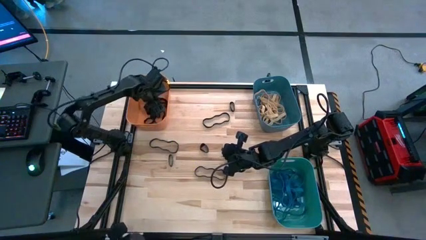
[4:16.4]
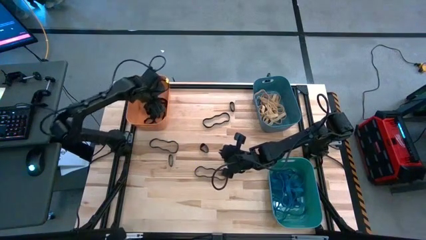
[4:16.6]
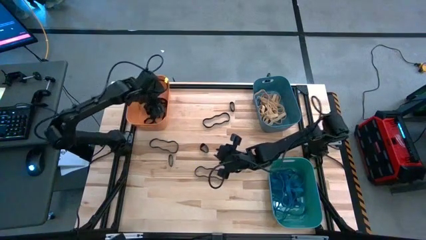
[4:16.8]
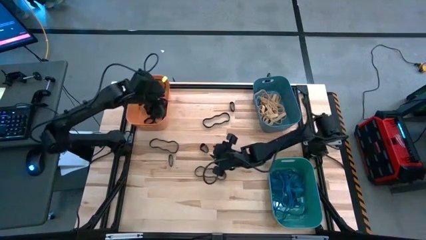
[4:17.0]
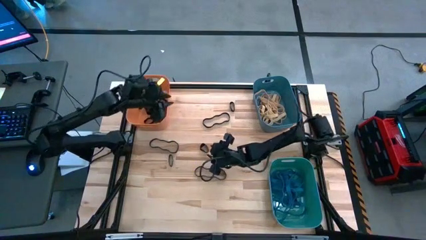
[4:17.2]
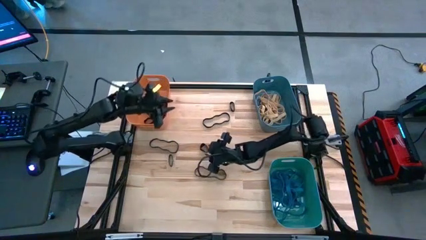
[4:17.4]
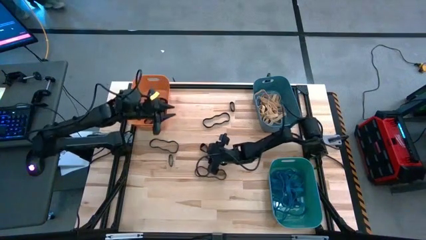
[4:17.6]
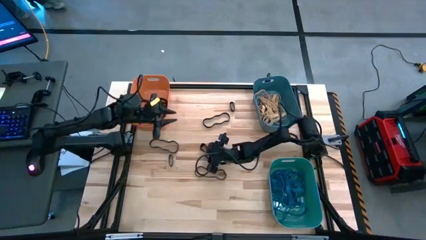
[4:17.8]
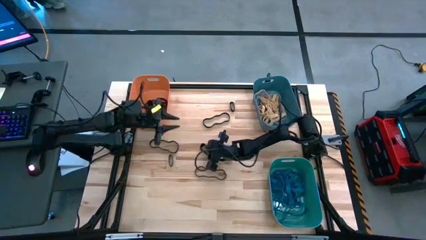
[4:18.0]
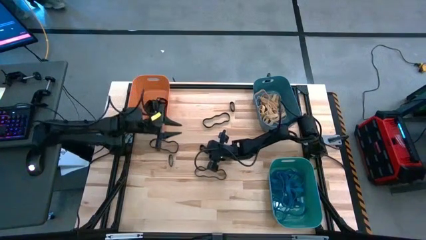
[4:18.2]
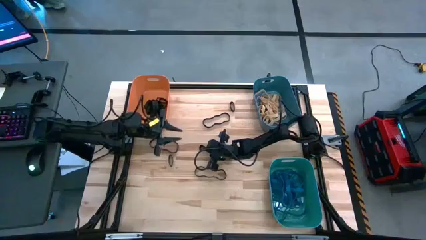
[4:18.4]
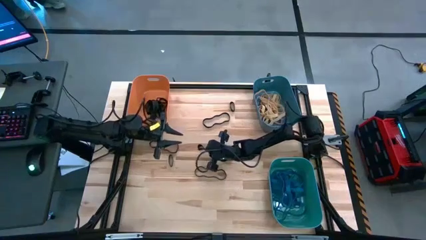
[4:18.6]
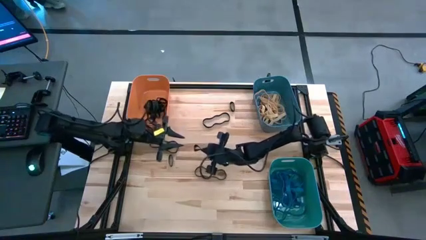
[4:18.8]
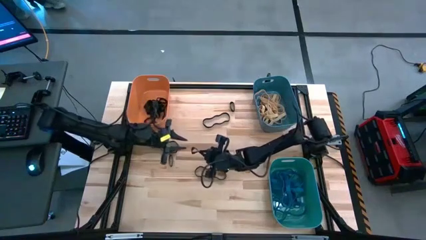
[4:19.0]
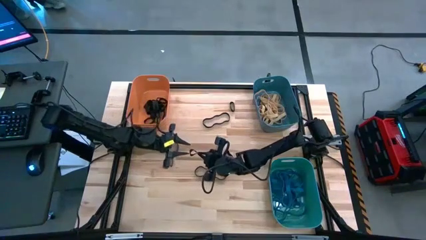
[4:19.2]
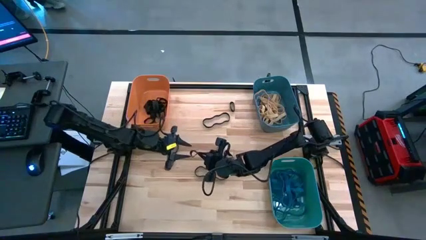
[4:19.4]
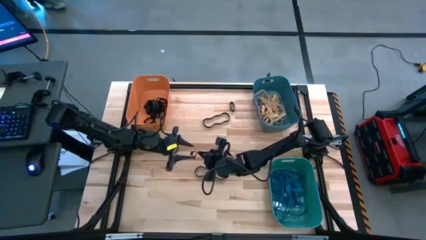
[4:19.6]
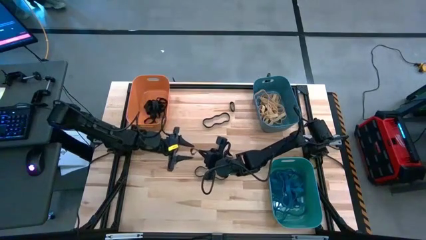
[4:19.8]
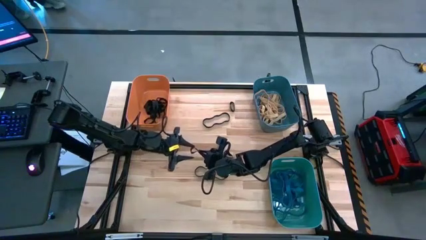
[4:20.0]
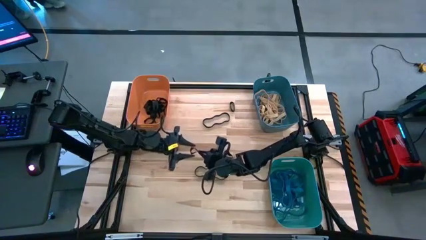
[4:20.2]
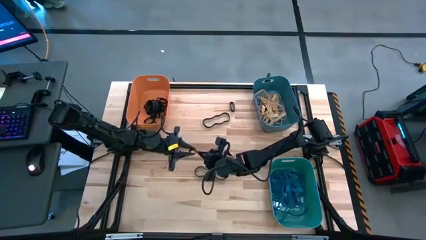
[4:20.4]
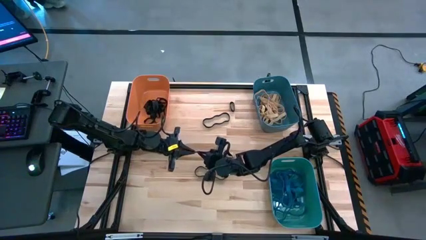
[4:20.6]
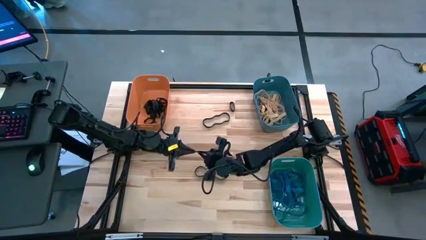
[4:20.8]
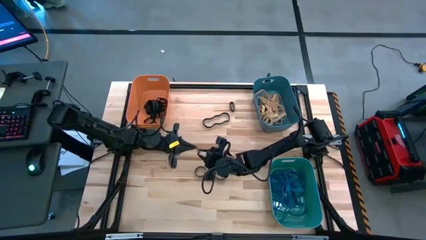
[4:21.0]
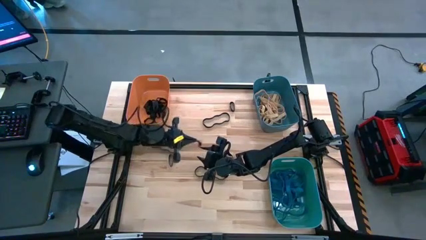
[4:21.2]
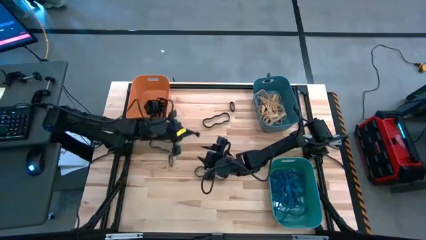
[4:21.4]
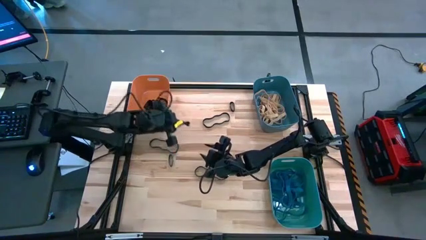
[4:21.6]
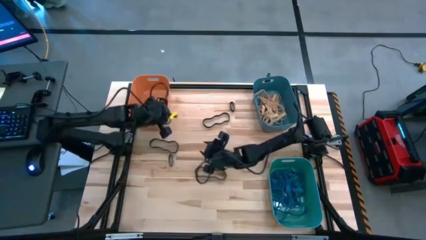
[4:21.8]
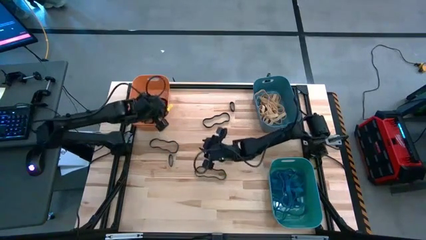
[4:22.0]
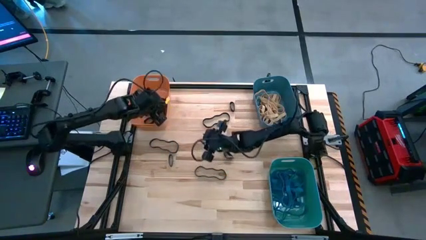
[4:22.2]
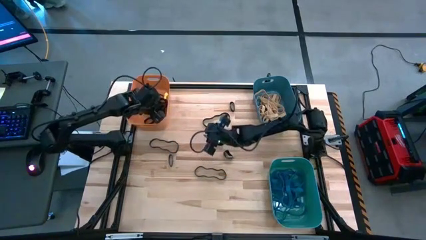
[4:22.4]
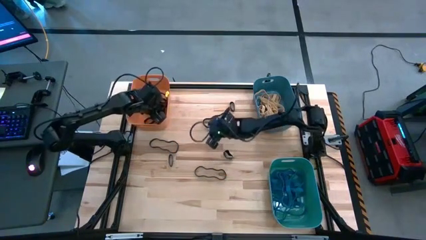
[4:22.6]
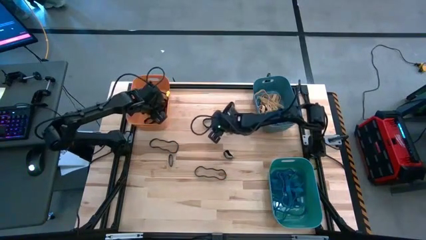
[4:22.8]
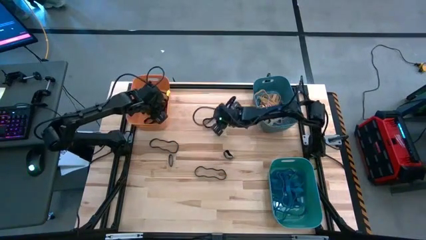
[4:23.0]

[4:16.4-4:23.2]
Task: Sort rubber bands into baskets
Put the black rubber band into the orange bin

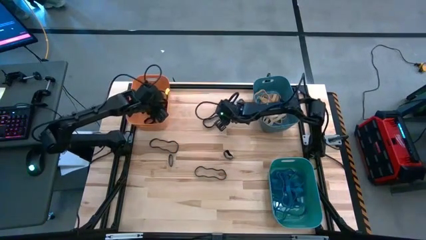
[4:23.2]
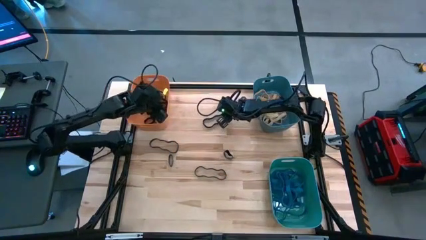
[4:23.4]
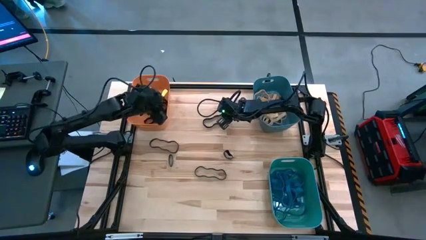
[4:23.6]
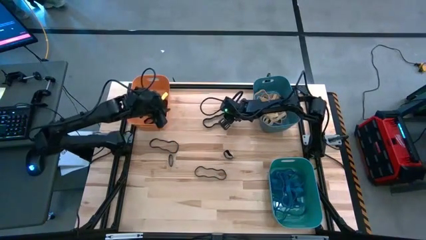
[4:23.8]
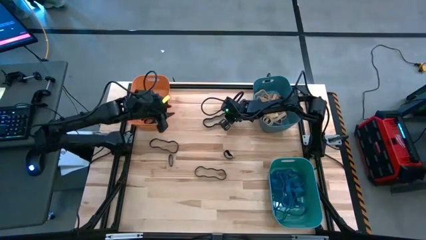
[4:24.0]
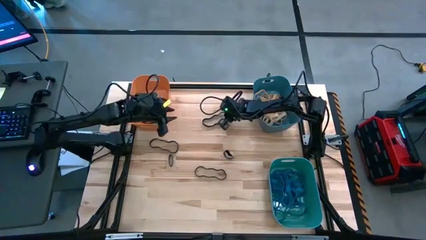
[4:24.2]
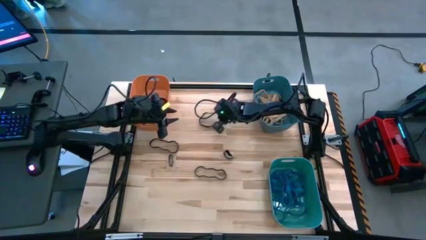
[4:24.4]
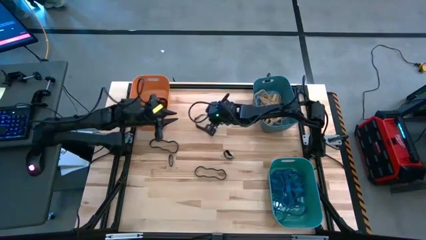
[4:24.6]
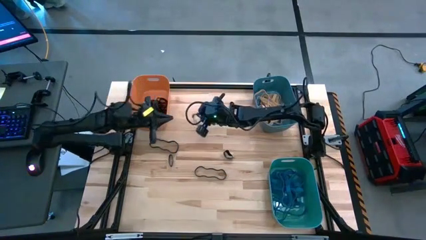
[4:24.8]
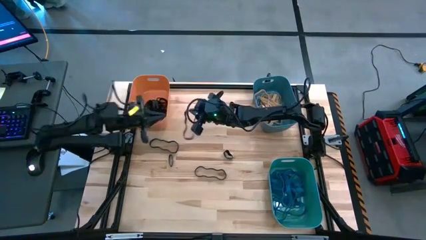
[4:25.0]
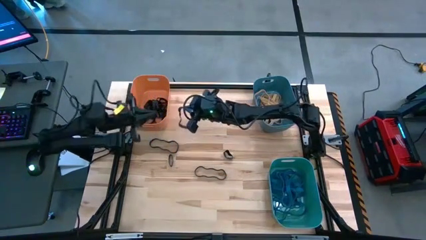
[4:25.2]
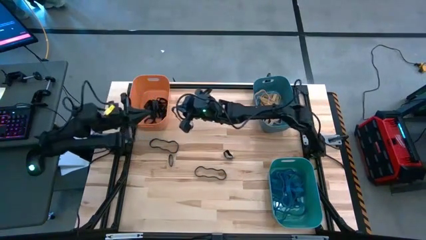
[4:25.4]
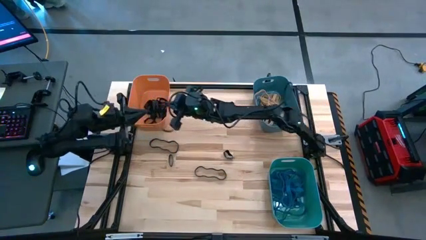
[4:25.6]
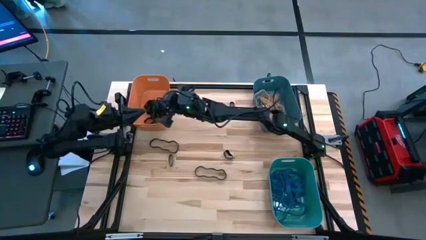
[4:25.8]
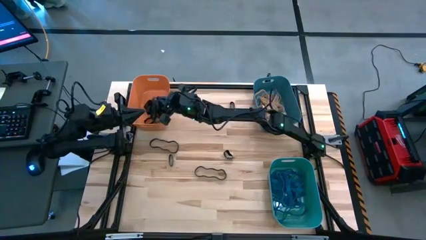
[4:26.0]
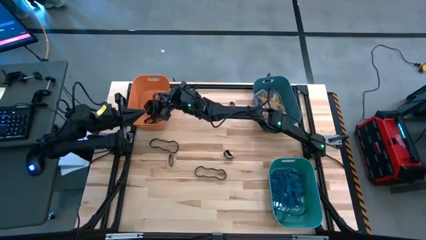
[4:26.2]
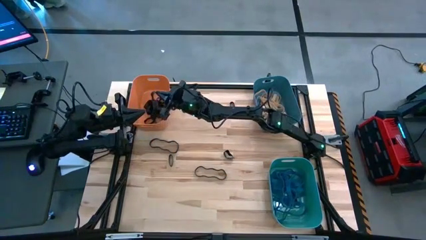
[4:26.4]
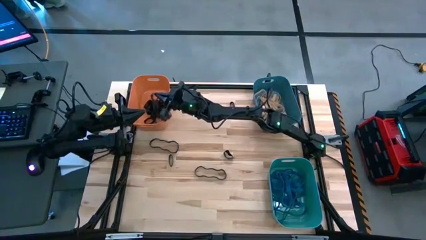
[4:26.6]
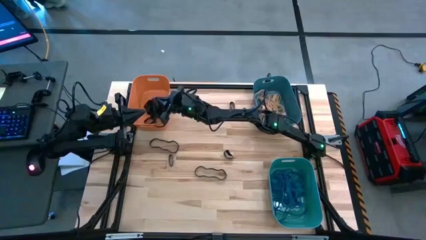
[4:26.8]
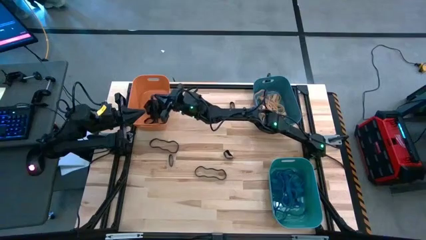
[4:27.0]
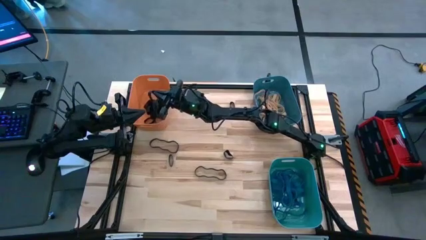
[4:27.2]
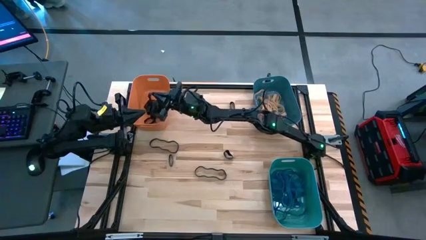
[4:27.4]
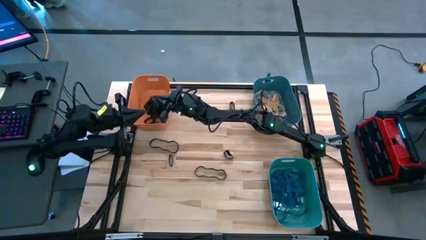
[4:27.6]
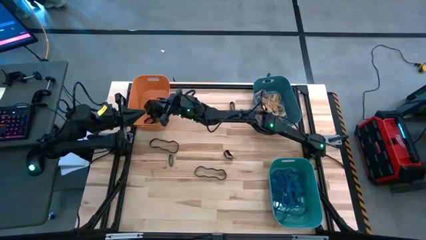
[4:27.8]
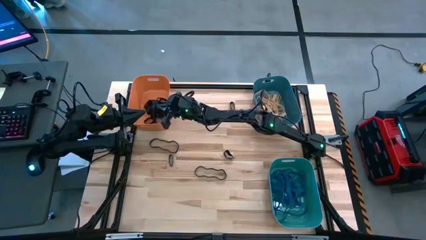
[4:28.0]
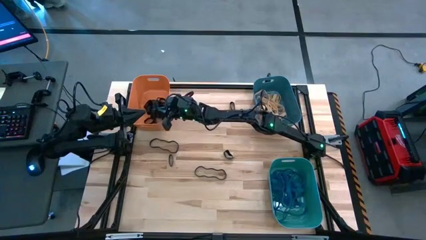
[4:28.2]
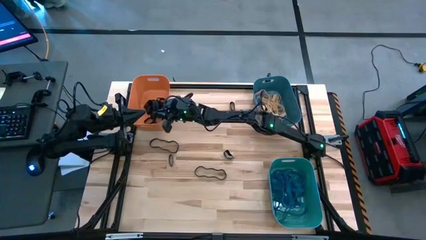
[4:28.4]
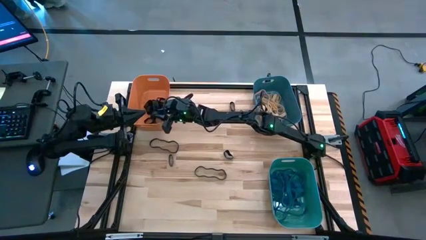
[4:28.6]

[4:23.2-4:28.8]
Put the black rubber band into the orange bin

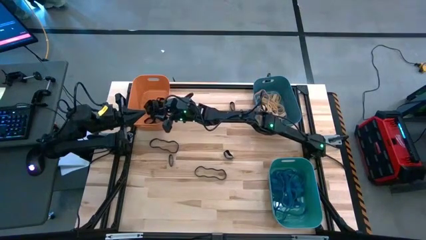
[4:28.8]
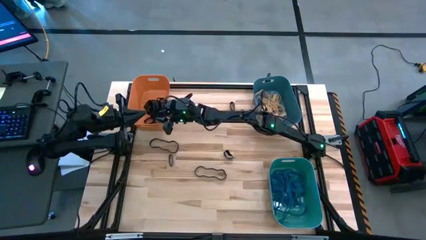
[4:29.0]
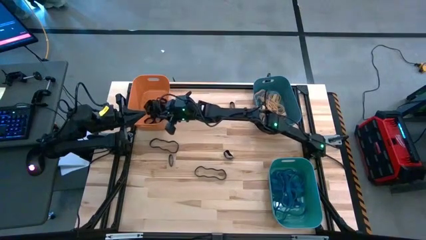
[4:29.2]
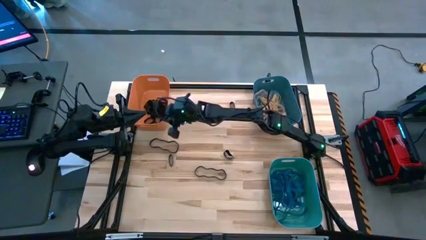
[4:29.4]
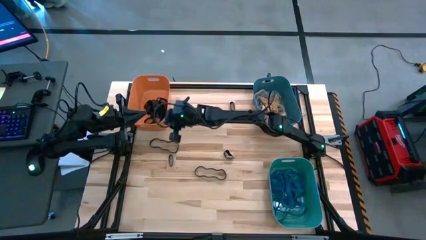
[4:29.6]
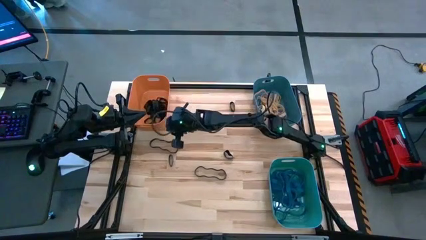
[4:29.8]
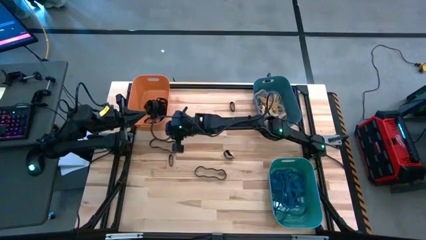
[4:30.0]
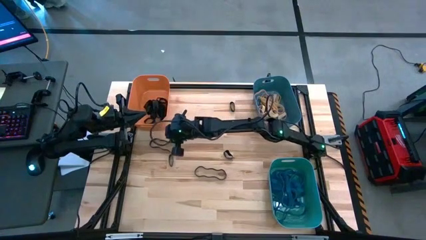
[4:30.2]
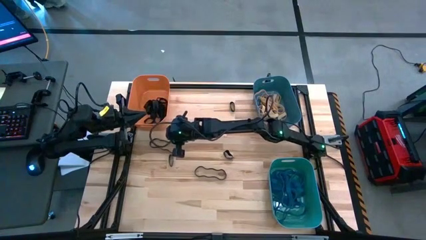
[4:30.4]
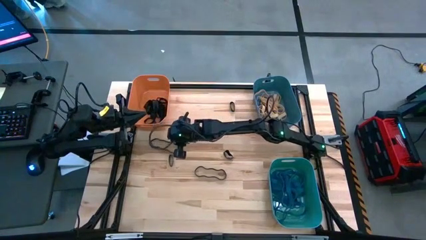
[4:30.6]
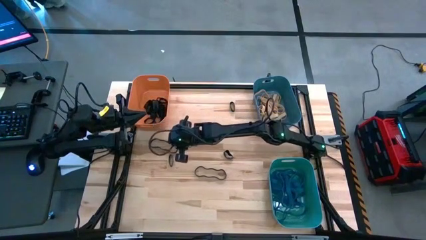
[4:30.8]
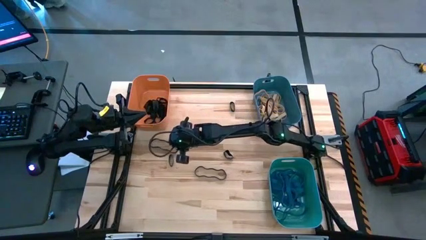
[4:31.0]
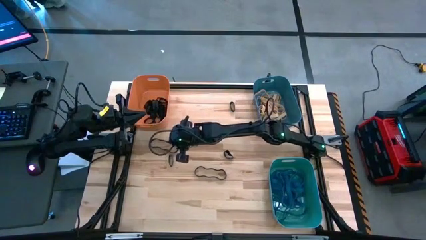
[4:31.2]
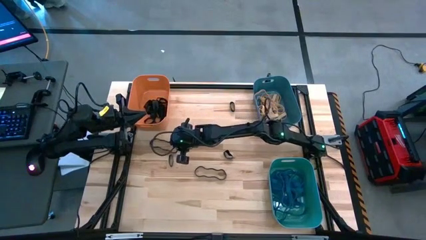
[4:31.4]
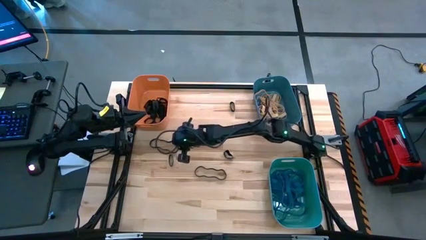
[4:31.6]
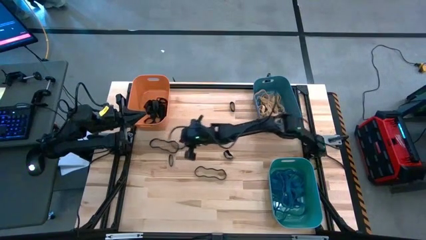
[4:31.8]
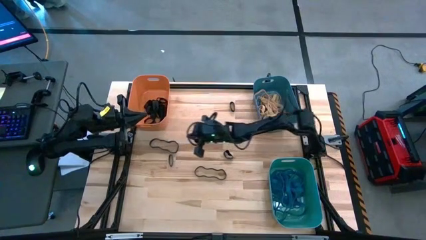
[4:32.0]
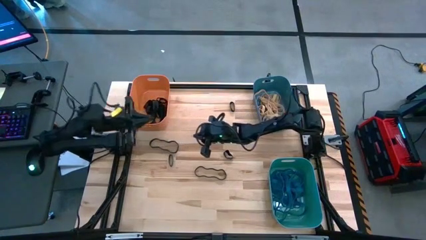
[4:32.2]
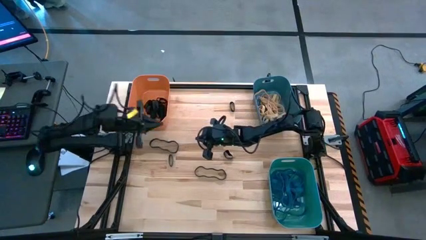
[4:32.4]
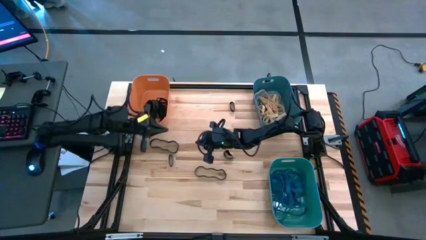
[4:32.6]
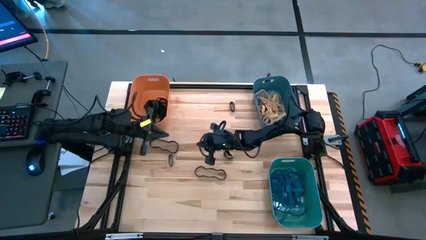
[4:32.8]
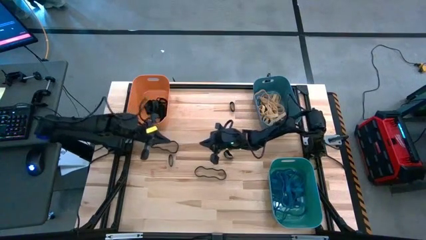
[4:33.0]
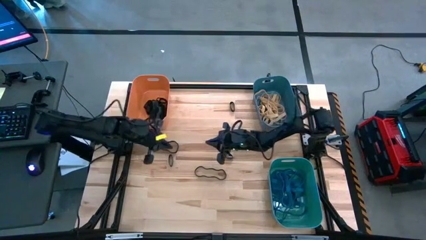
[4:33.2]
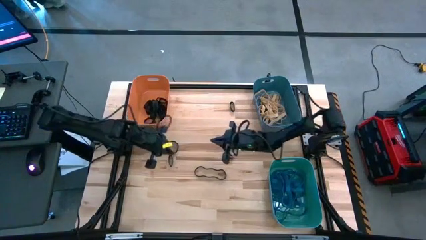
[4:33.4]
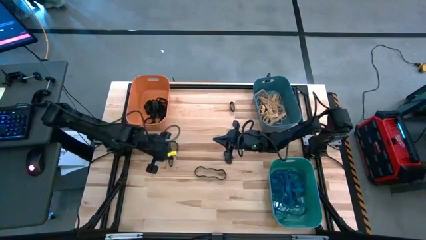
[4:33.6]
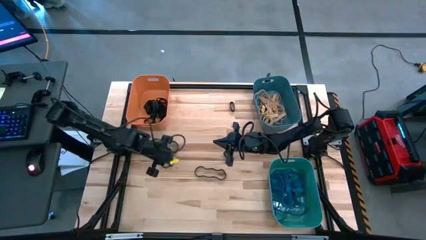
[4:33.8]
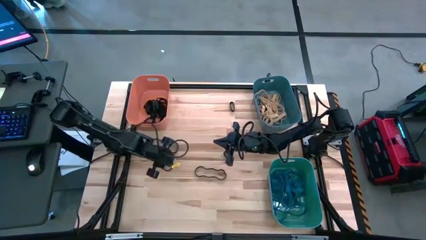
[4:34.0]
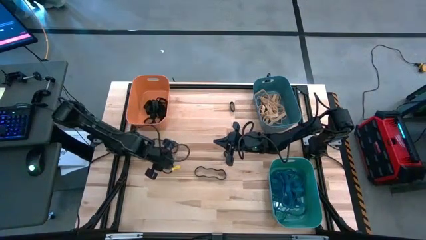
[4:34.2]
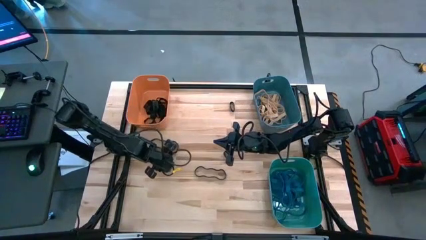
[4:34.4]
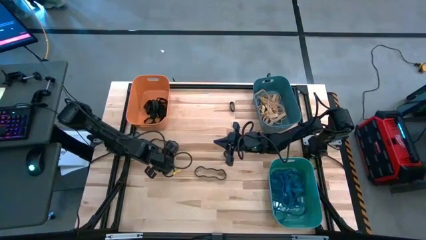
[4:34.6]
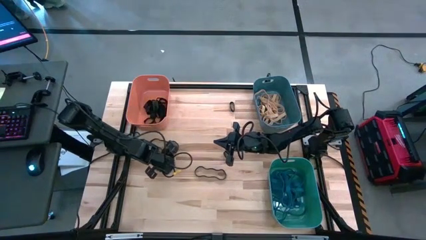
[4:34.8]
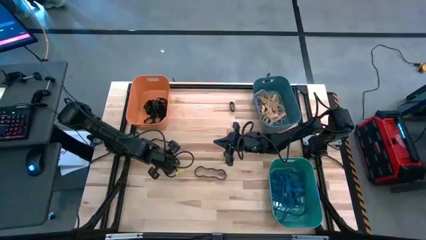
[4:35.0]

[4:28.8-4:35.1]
Put the black rubber band into the orange bin
